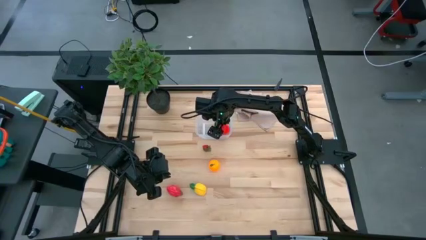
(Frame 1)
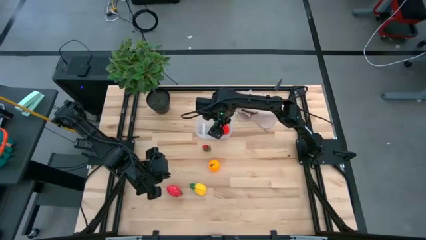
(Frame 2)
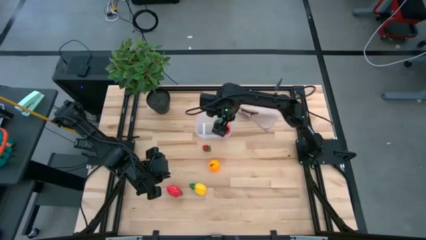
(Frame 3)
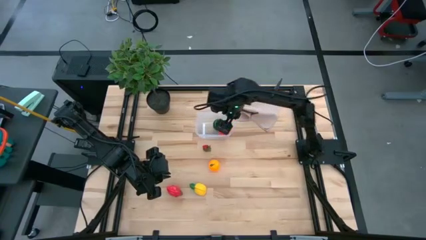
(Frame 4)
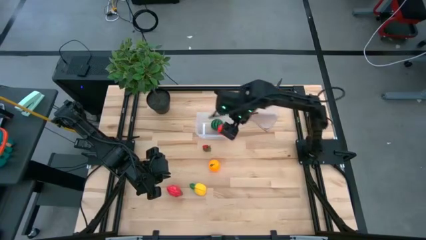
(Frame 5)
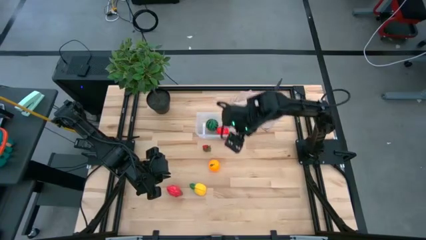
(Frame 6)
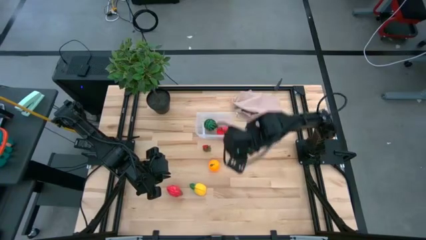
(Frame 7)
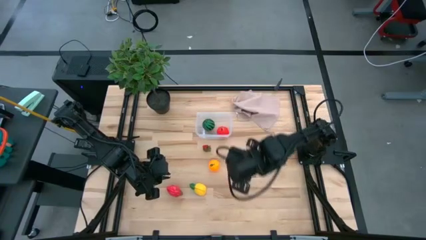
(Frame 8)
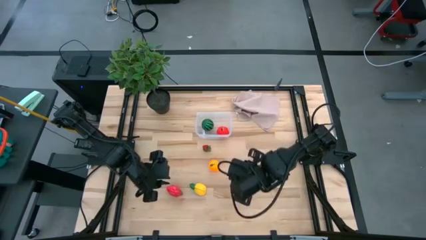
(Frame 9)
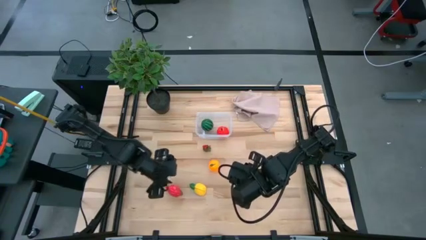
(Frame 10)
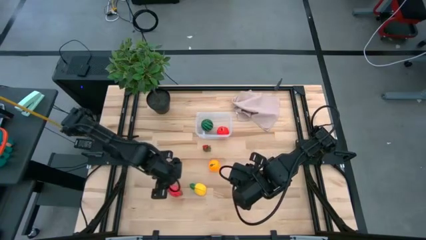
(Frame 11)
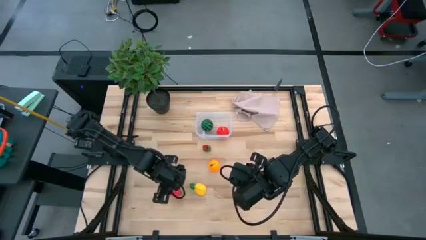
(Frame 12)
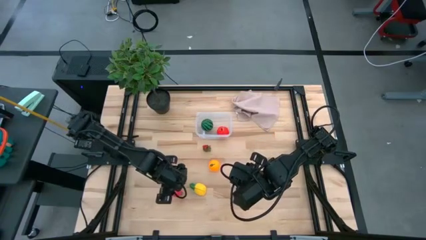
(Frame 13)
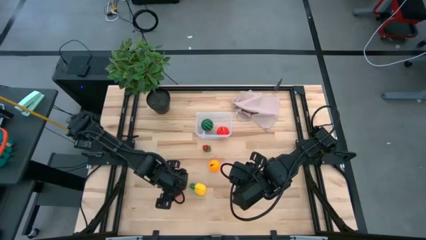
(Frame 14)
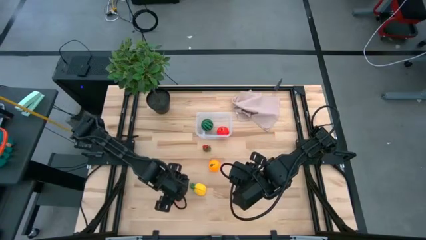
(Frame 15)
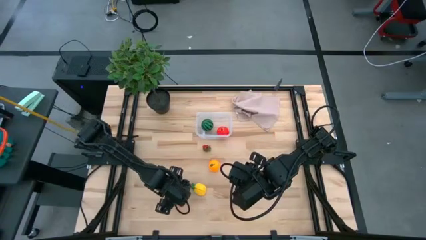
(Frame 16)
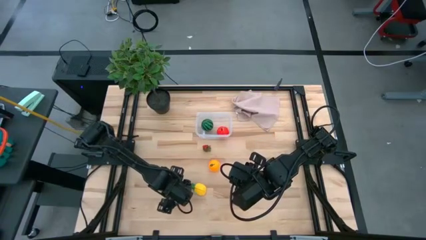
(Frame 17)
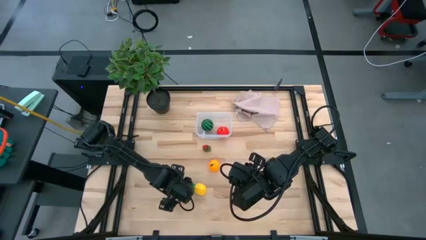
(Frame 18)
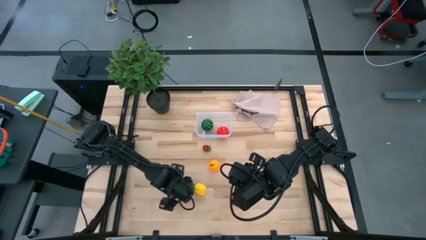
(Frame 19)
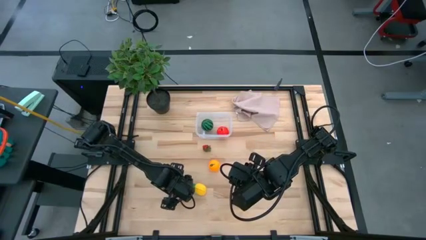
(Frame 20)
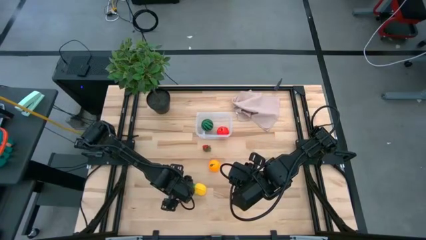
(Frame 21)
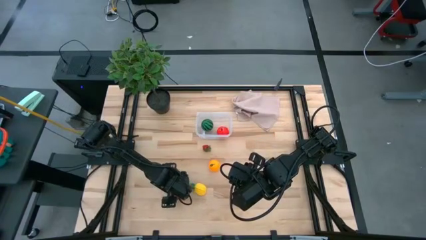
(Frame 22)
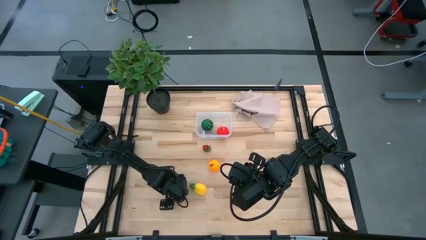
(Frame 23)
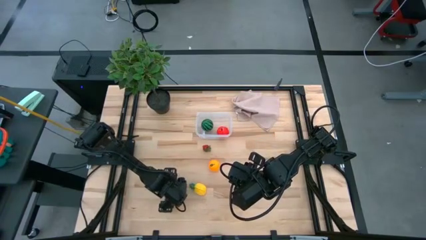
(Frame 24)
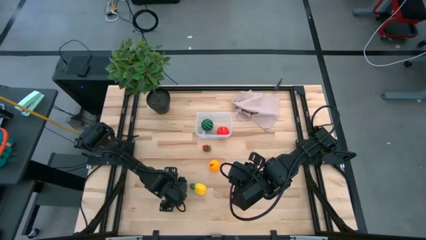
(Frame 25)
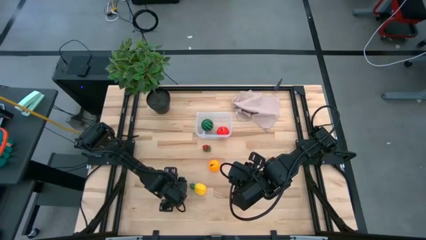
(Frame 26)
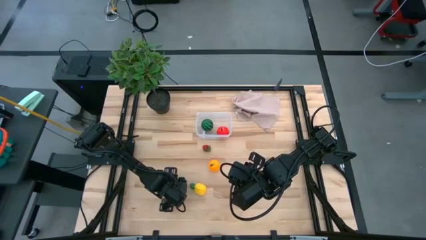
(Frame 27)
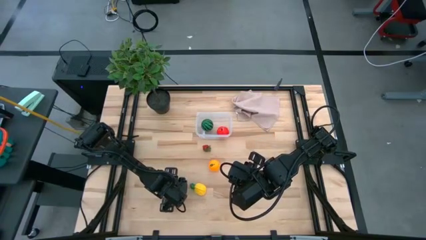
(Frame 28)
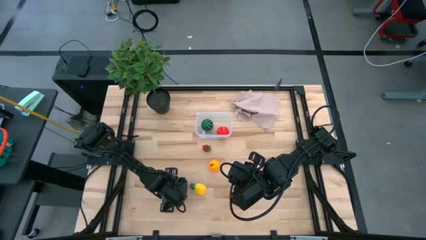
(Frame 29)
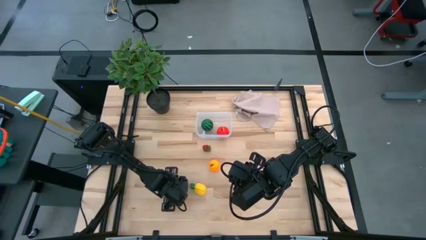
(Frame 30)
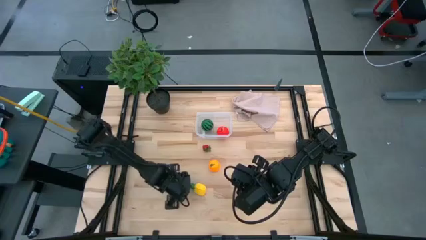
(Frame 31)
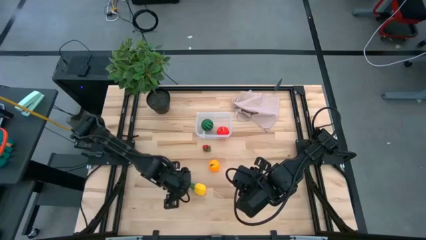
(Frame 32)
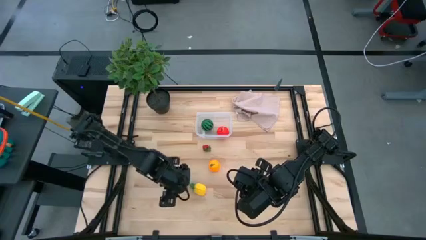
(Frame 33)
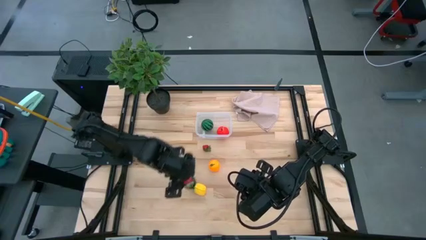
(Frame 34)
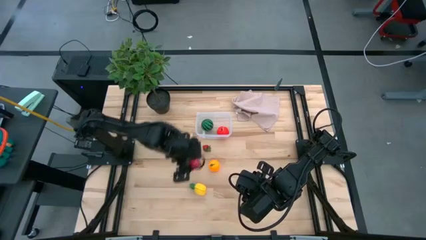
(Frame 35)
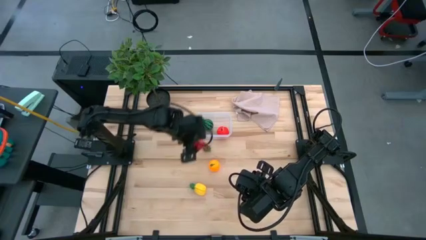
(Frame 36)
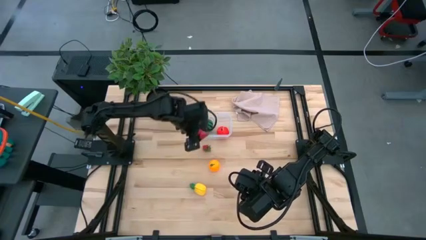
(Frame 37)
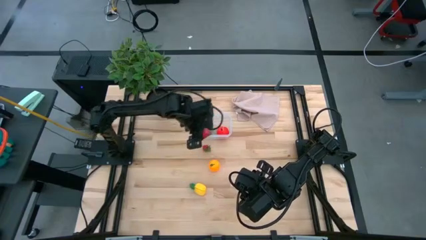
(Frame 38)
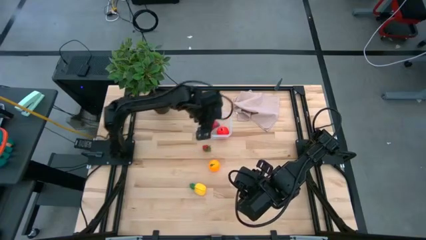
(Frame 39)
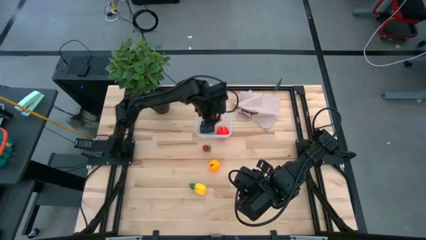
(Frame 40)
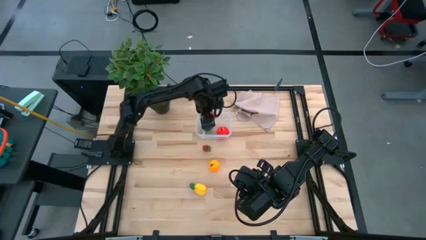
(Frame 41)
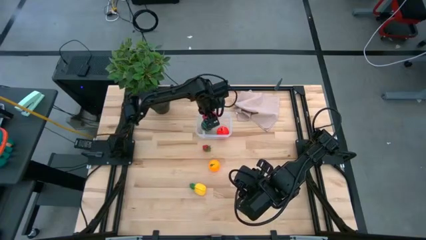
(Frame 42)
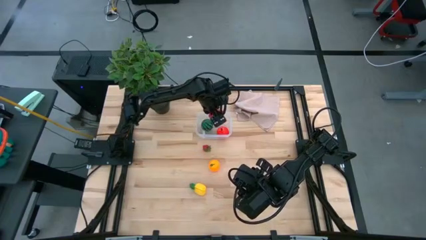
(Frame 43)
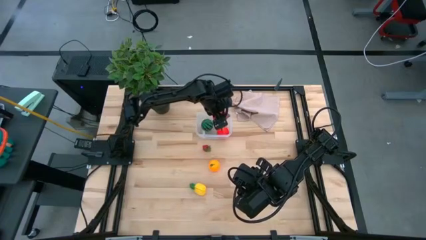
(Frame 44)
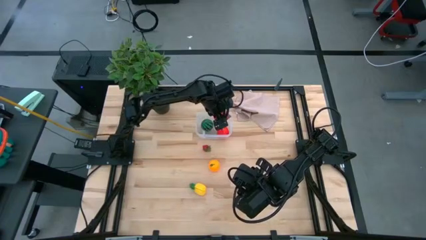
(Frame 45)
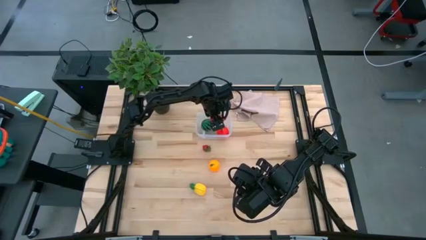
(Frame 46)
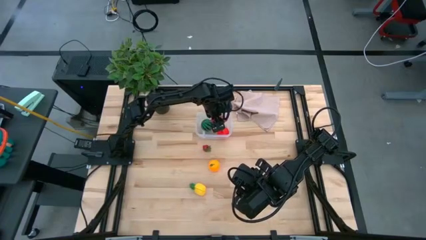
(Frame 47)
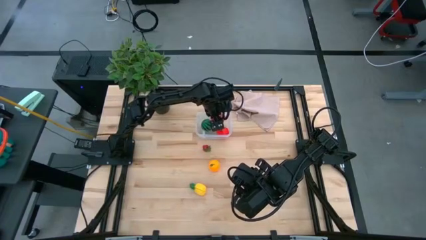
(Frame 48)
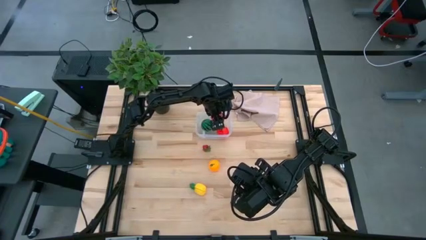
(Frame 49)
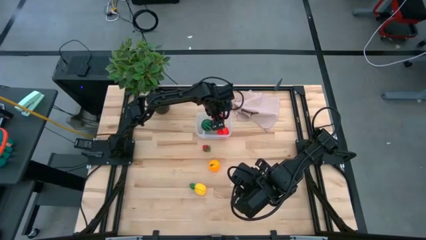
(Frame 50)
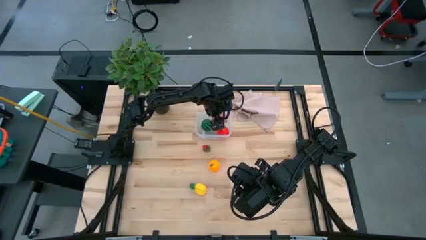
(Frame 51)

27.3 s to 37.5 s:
Task: Pick and placing Produce into tupperware
Put the red dragon fruit into the transparent container

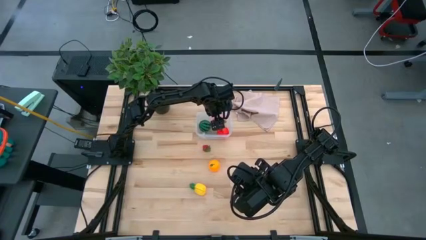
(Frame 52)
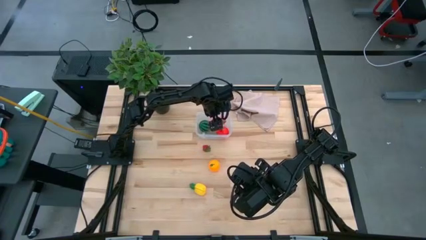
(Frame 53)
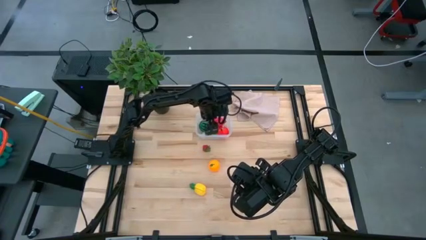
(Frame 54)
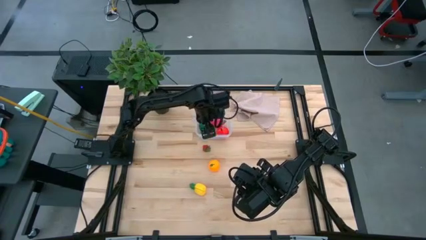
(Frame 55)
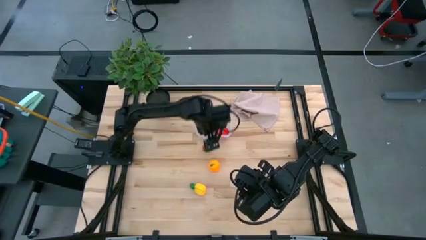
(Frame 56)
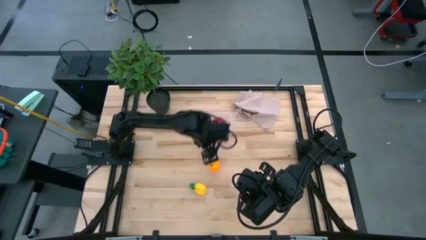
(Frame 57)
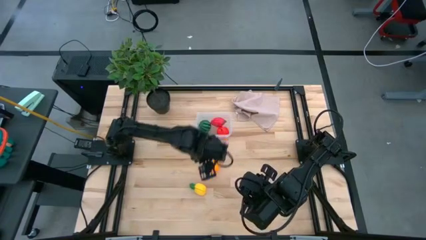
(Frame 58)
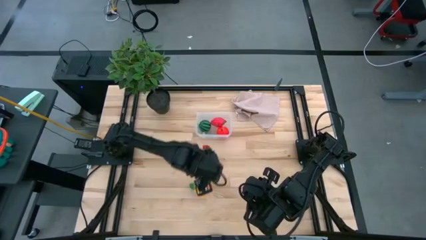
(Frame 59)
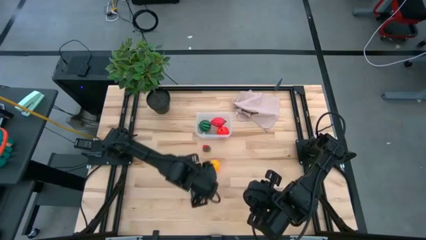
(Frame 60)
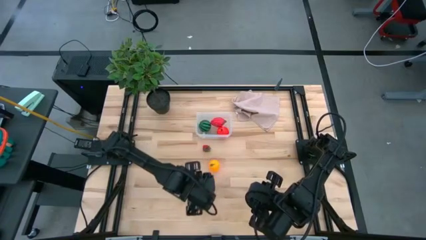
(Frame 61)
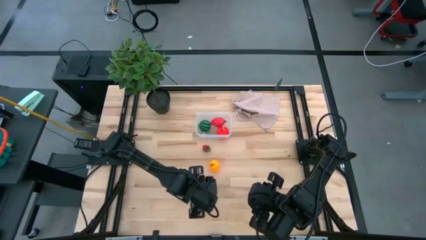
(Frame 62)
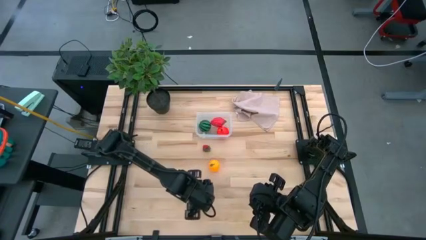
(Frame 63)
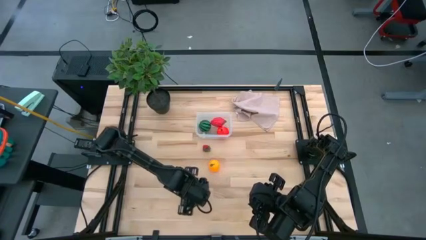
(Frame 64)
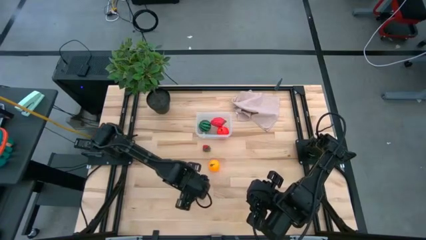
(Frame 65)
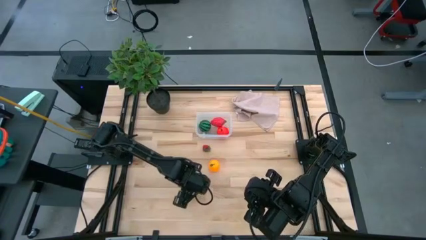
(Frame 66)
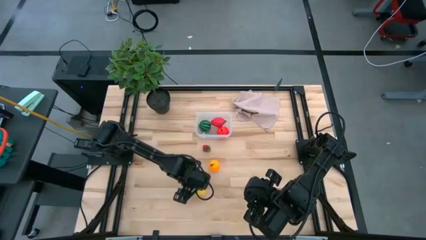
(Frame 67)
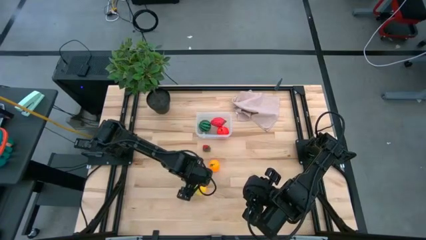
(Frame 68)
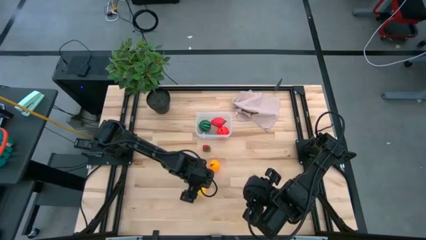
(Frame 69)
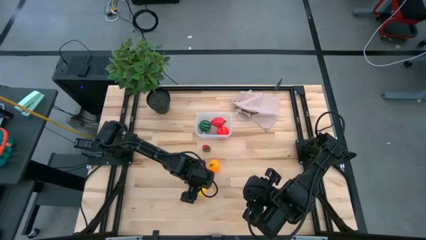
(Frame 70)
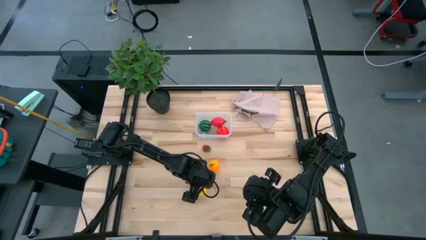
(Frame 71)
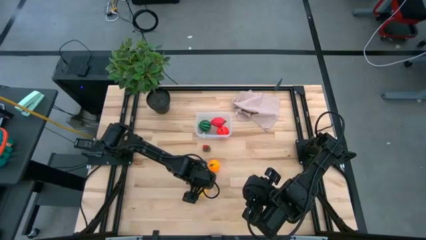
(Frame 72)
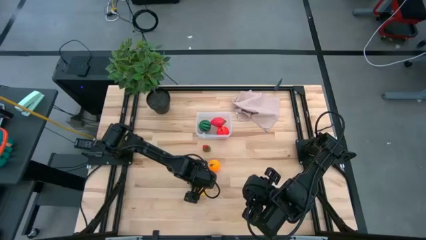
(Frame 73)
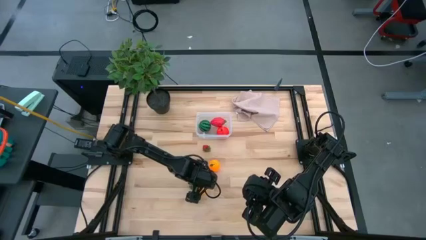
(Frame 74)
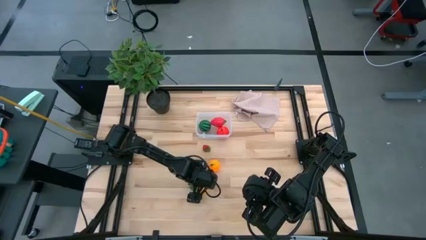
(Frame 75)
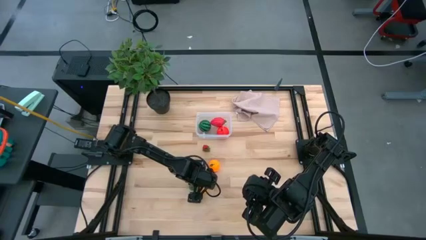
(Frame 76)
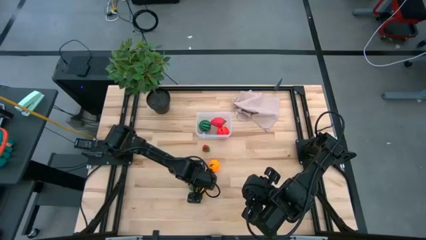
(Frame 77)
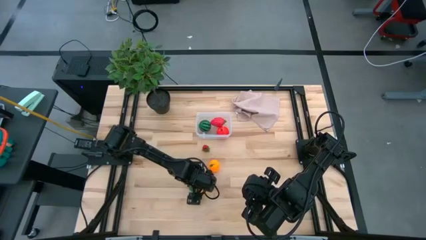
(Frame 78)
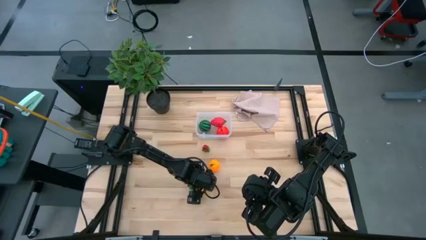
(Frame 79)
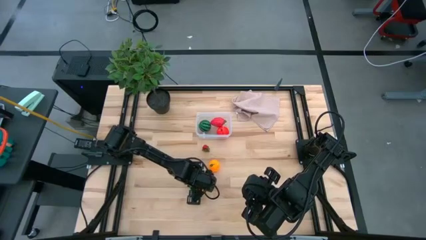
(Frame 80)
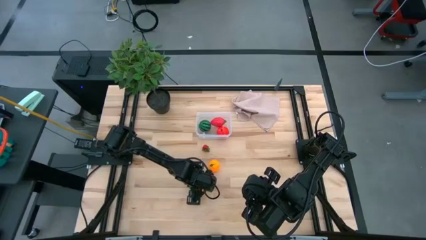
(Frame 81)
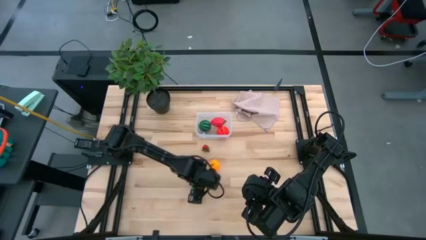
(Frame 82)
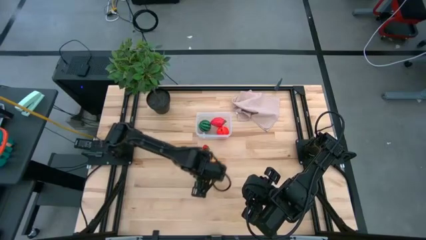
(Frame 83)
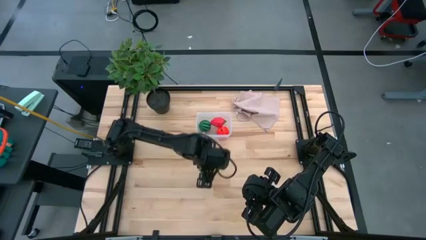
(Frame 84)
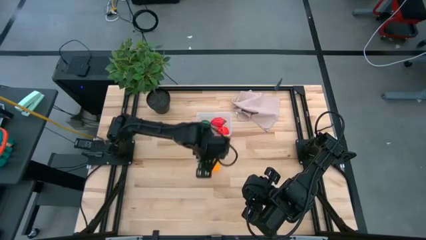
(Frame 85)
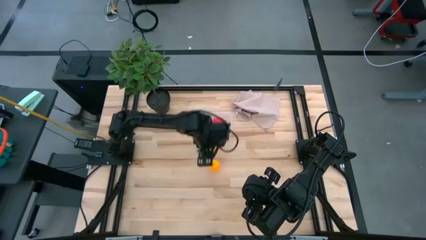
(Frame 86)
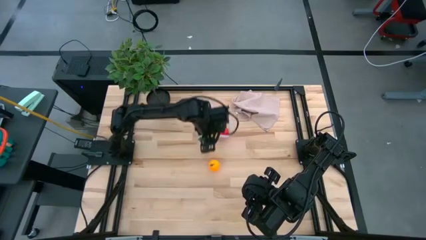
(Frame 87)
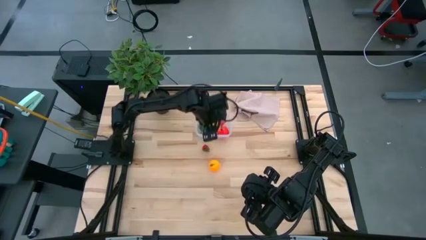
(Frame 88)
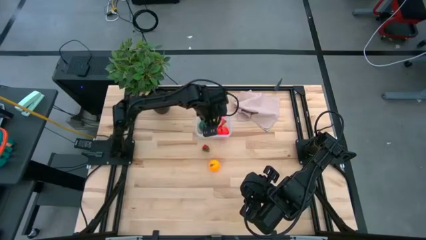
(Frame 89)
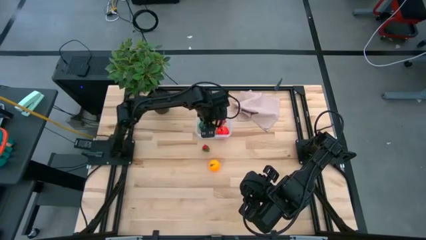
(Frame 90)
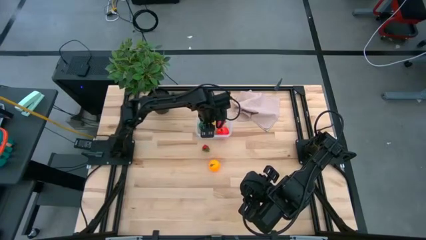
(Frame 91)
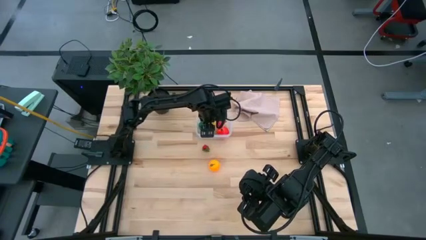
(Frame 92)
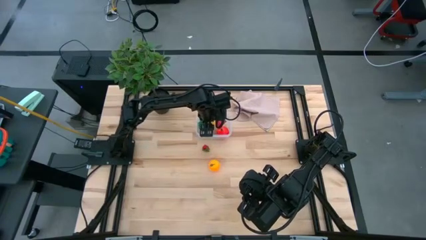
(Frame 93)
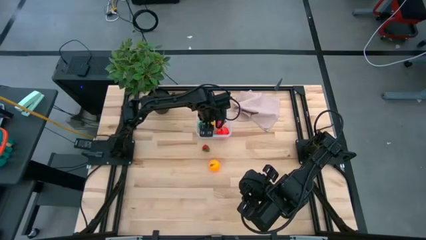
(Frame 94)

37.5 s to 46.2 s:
Put the yellow pineapple into the transparent container
